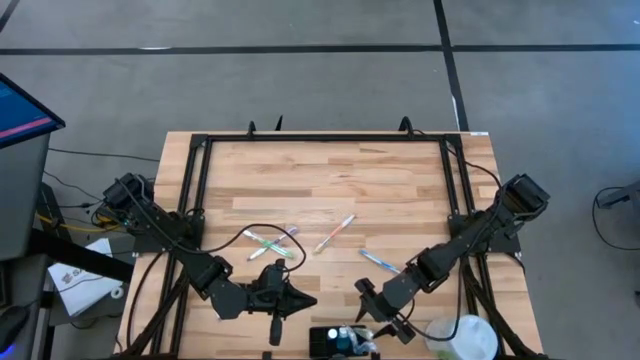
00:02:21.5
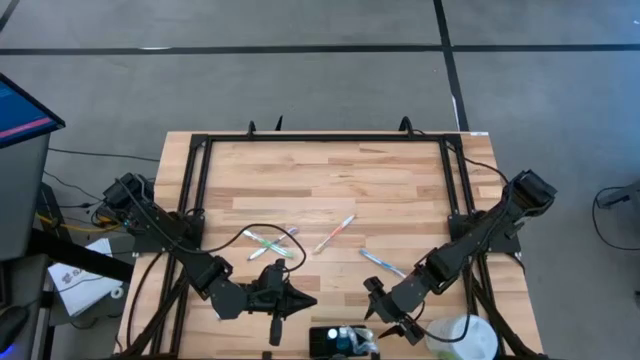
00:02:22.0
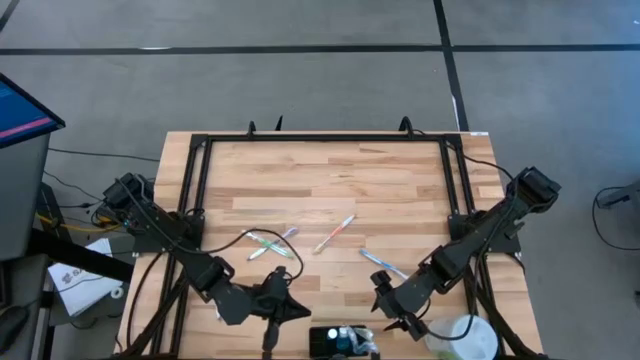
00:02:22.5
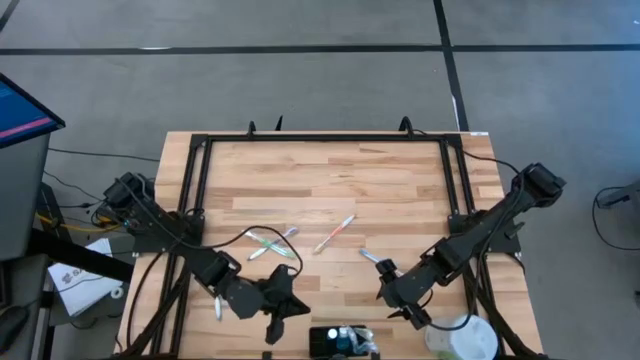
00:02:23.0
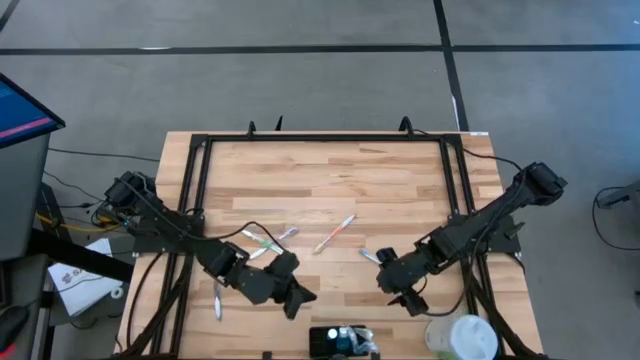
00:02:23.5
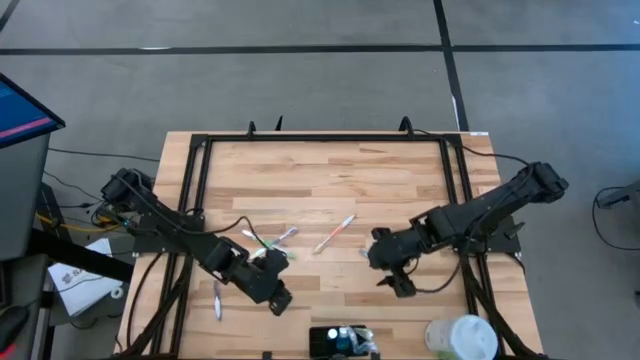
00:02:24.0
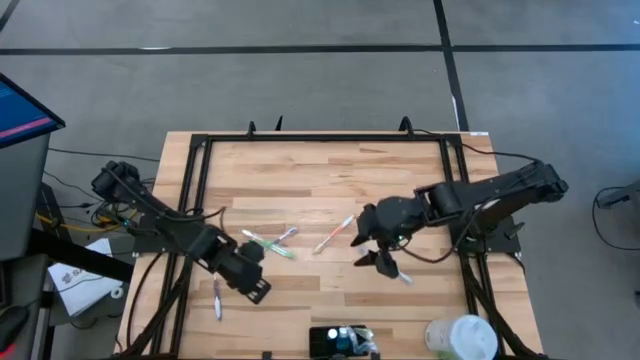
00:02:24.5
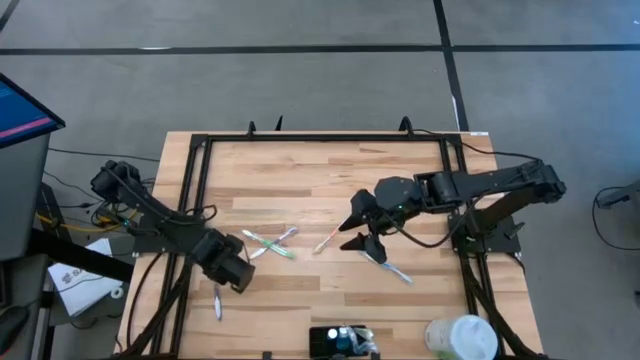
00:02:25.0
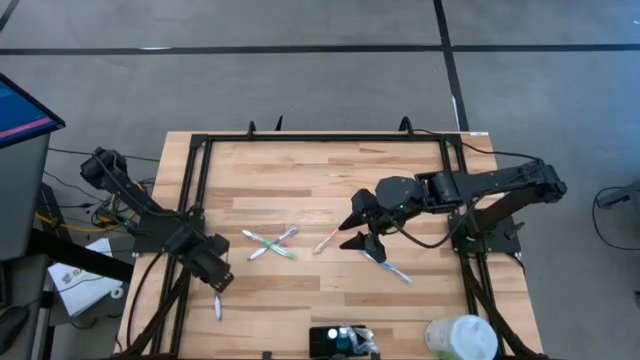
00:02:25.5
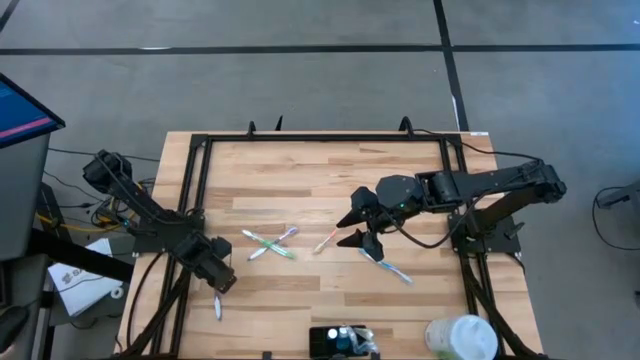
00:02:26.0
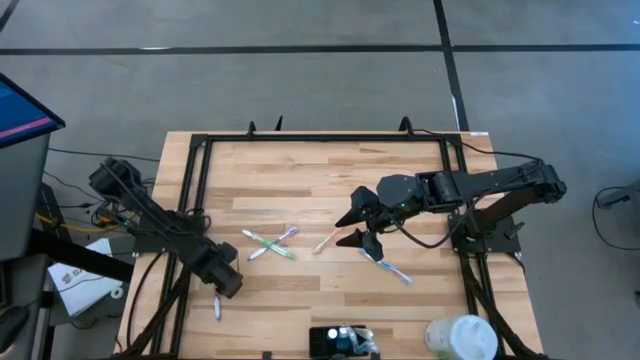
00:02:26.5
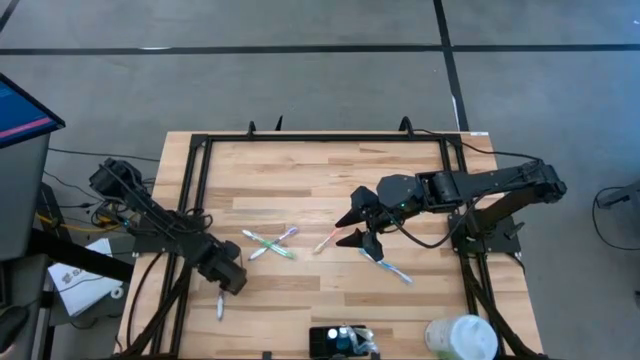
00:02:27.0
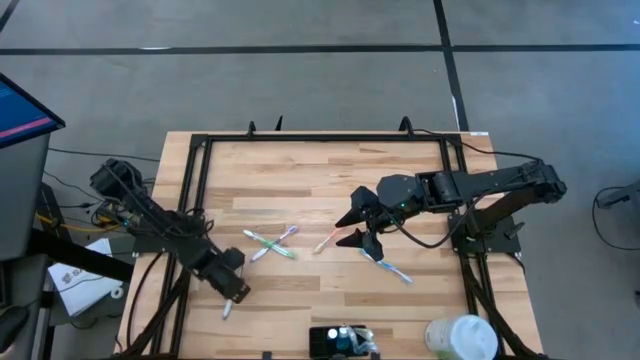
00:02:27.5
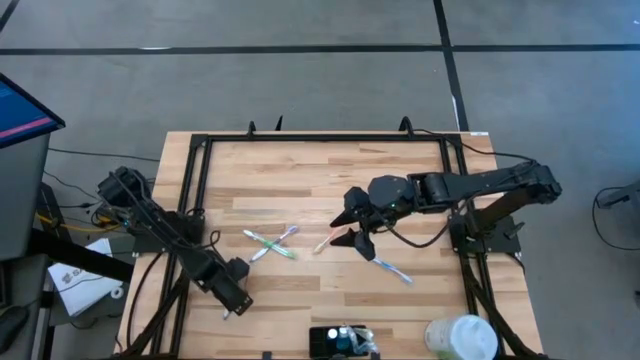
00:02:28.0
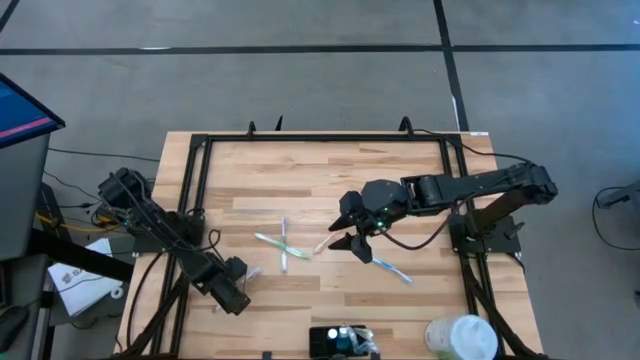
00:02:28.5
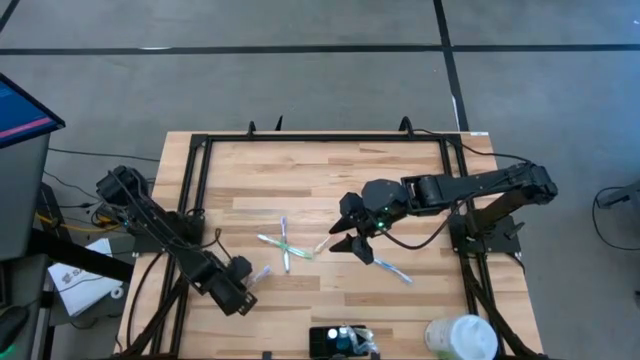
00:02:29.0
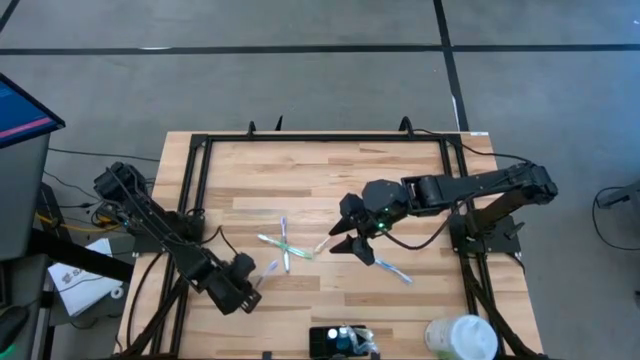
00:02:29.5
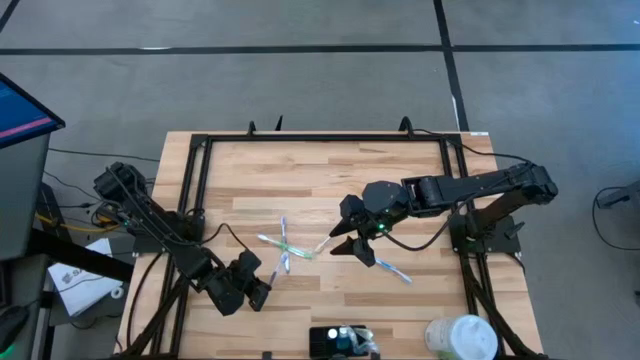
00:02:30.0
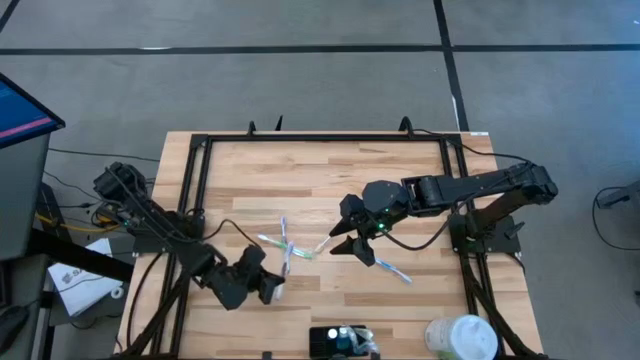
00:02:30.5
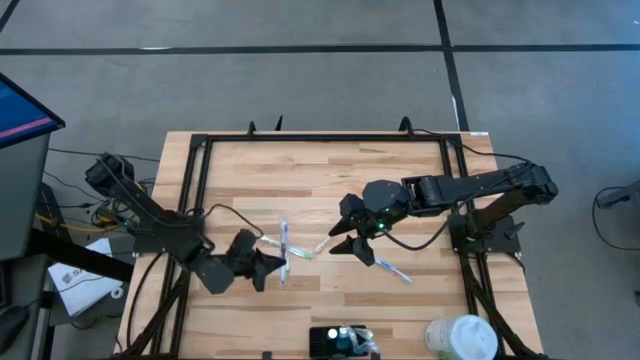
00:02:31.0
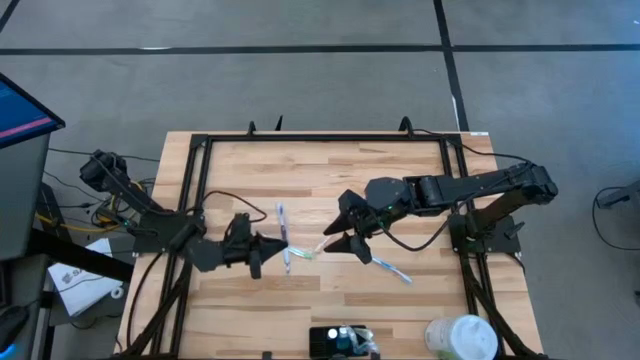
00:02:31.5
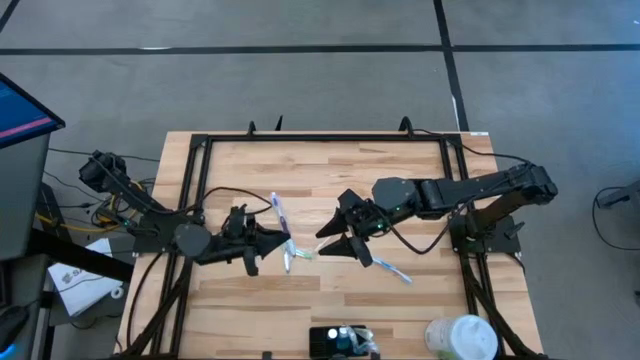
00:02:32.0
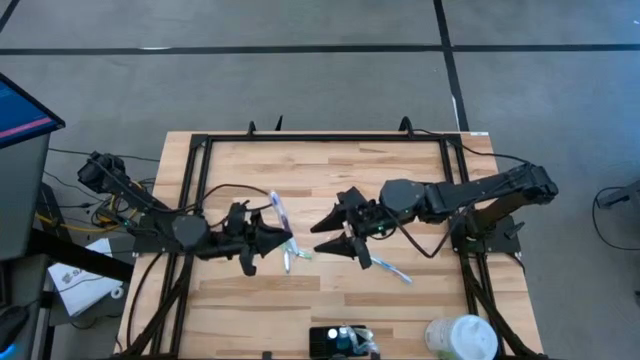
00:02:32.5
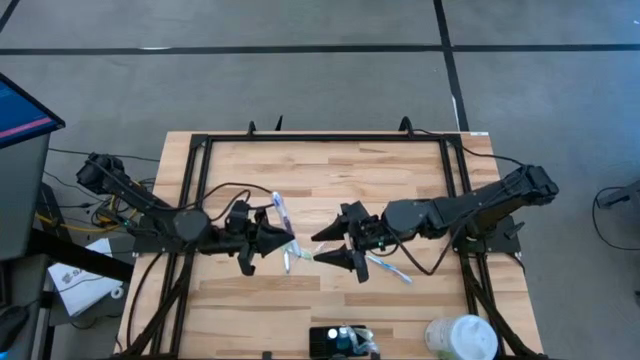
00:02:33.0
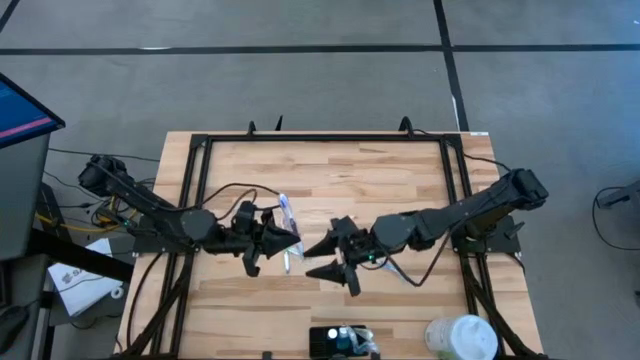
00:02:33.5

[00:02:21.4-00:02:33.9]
Task: Pick & Place toothbrushing station
Put the bottom purple toothbrush into the black mesh organizer

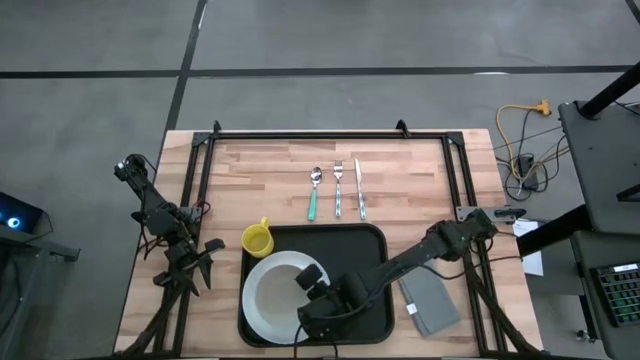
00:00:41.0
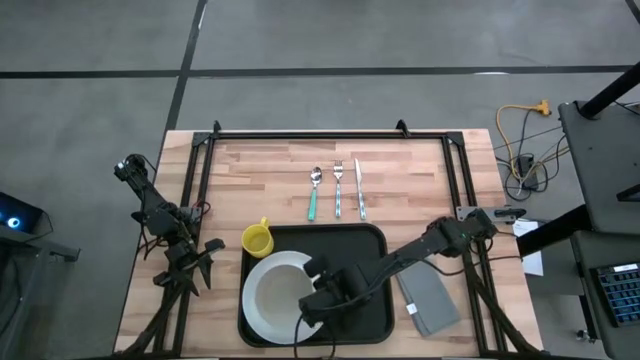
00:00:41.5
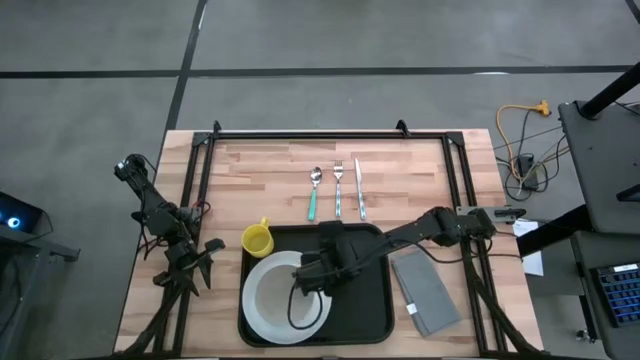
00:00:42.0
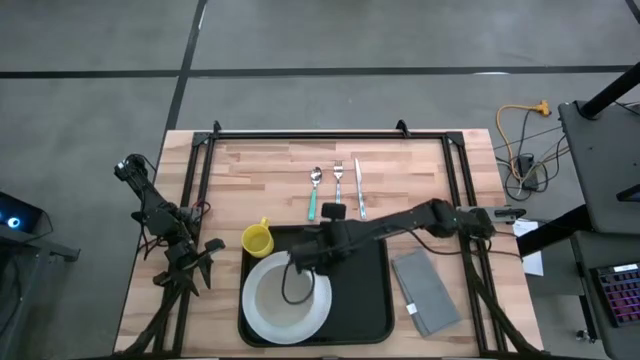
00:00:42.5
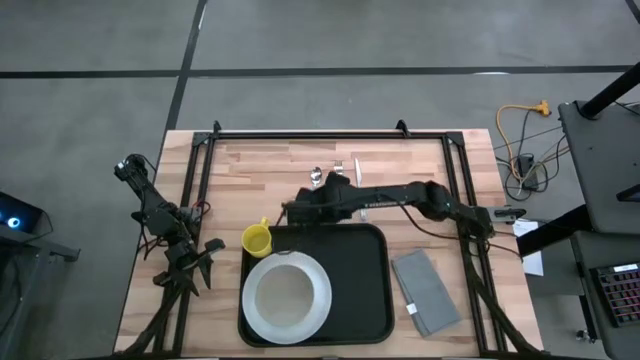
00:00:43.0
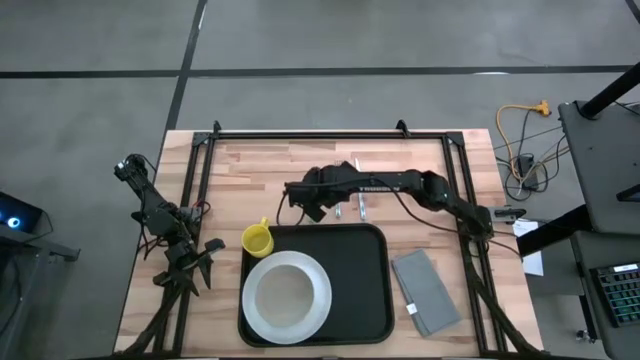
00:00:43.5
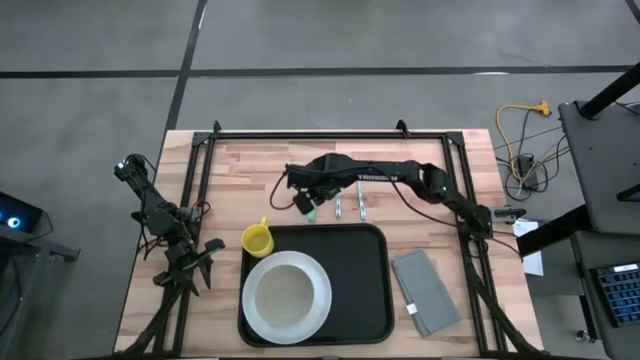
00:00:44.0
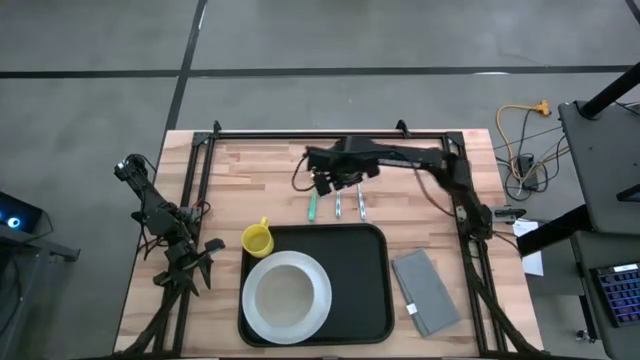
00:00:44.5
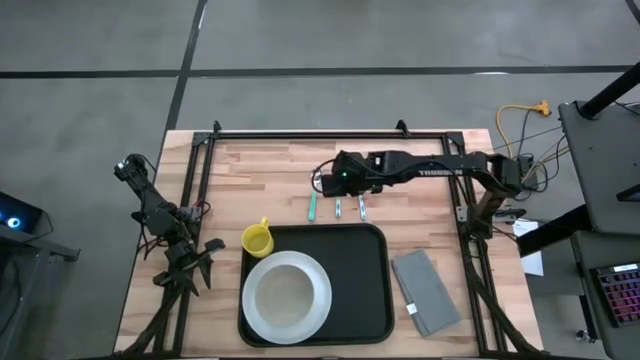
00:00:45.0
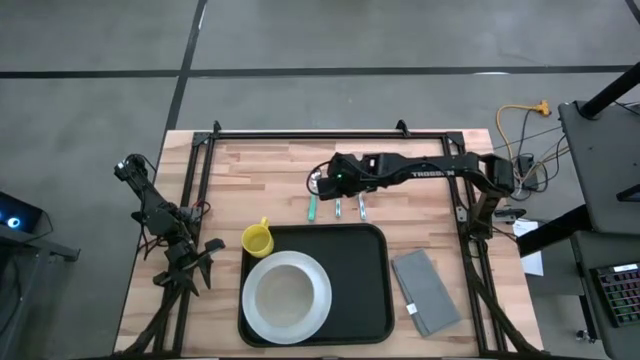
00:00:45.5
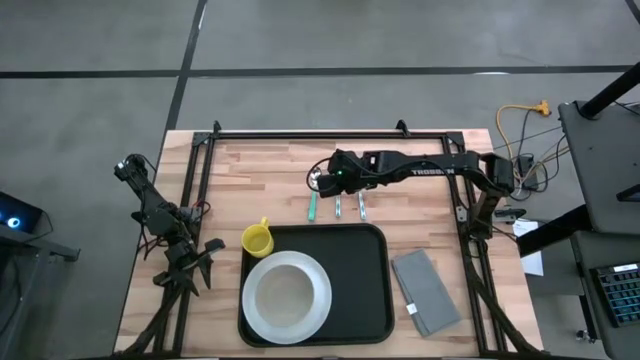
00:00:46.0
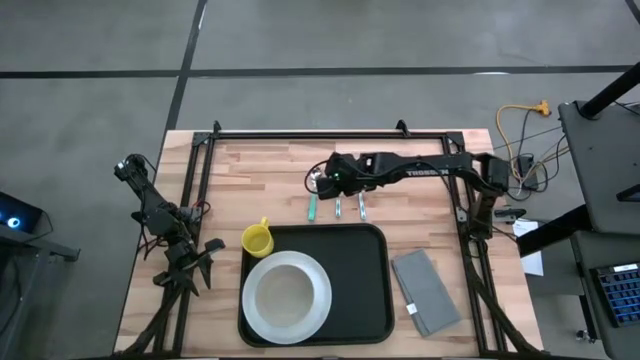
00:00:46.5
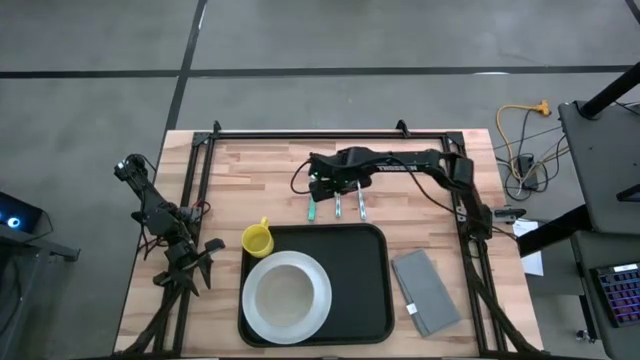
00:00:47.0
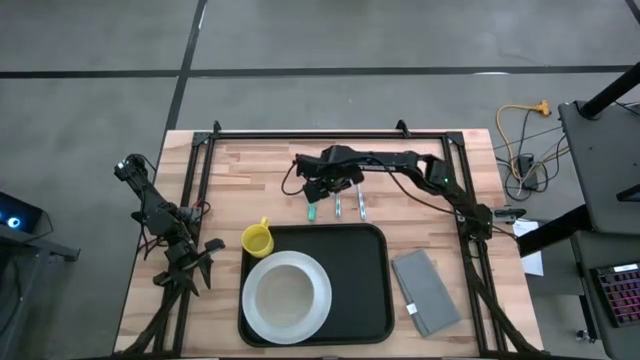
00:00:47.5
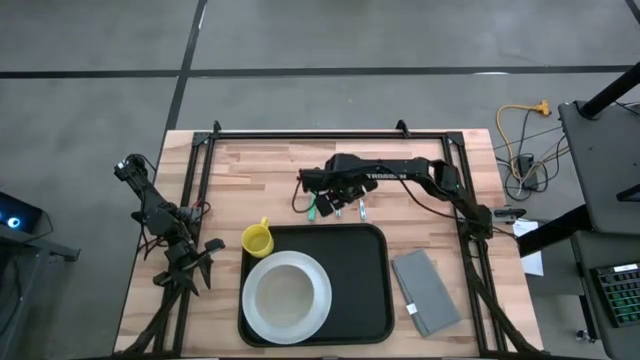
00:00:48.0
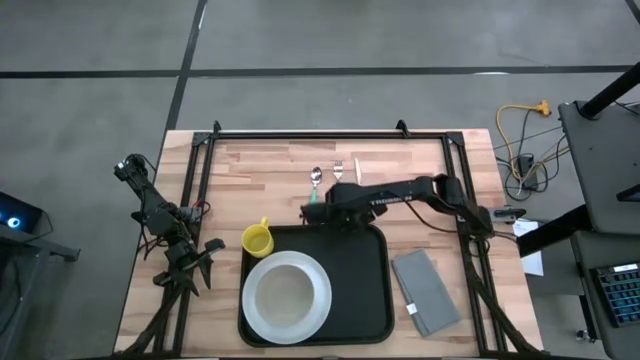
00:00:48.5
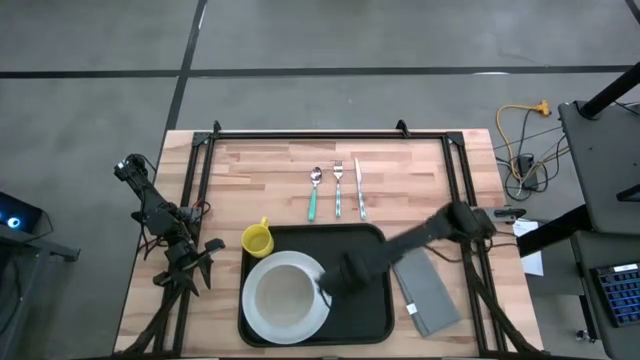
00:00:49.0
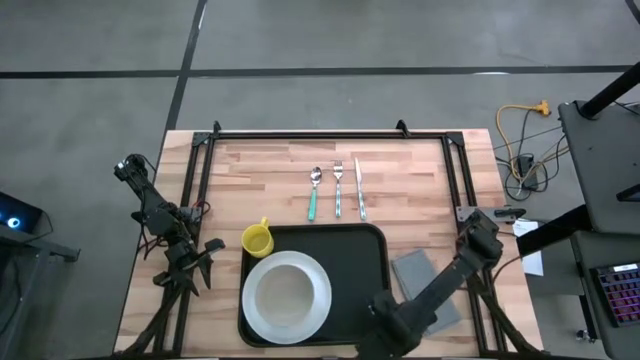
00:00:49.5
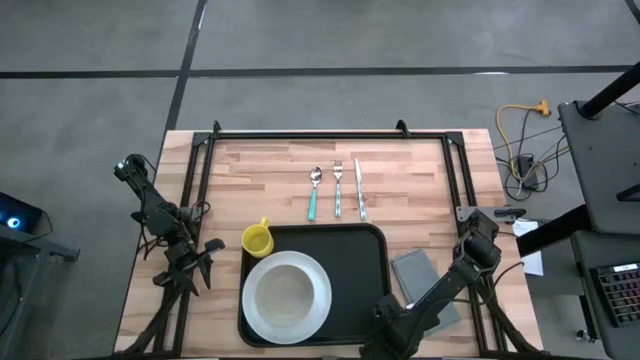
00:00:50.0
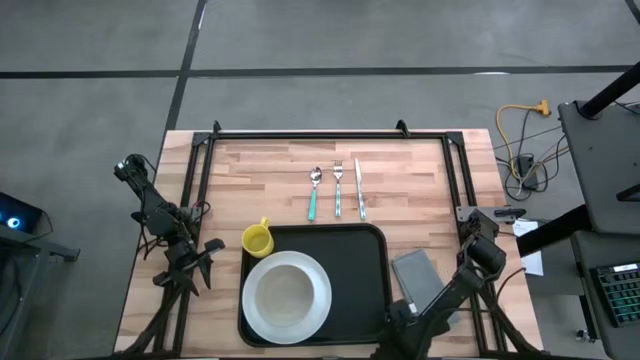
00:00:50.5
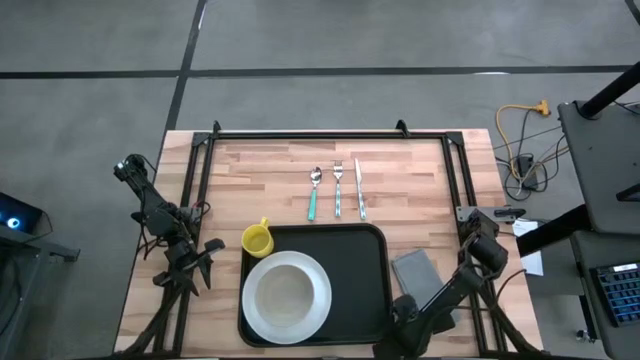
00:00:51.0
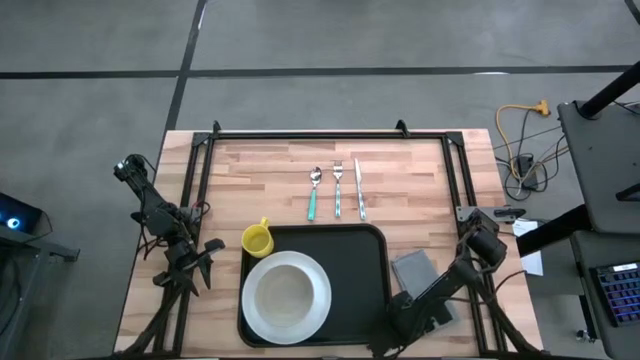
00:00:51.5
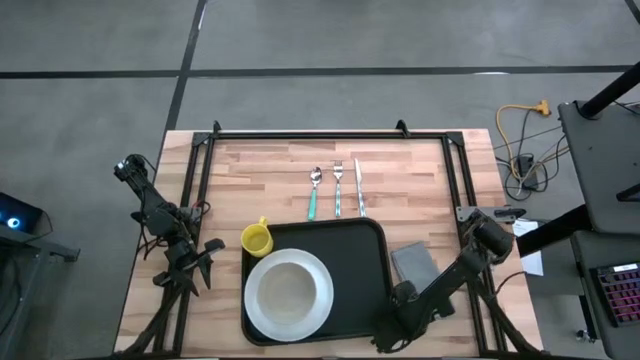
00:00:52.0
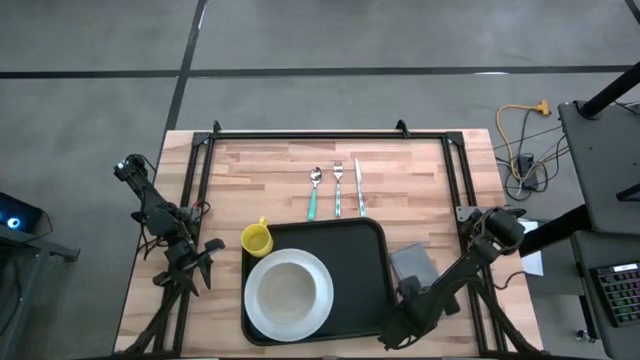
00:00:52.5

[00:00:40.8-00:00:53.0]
Task: Set up tray
Put the gray napkin on the black serving tray to the right of the white plate
